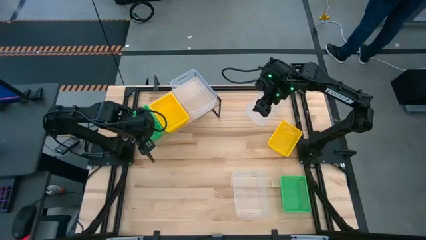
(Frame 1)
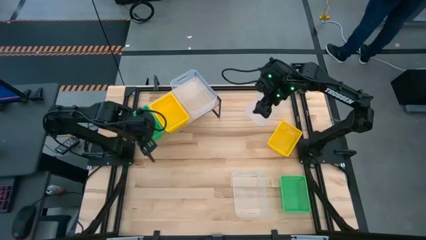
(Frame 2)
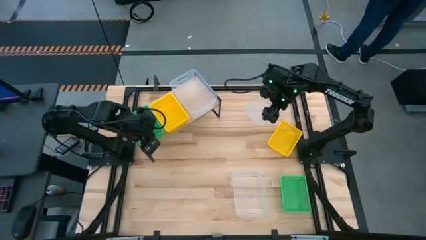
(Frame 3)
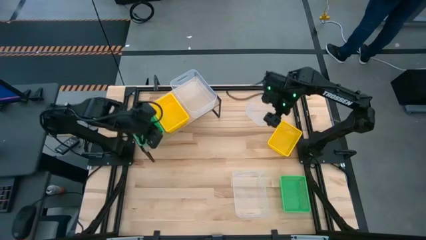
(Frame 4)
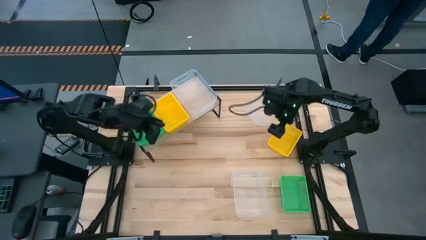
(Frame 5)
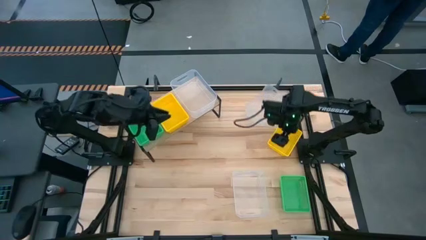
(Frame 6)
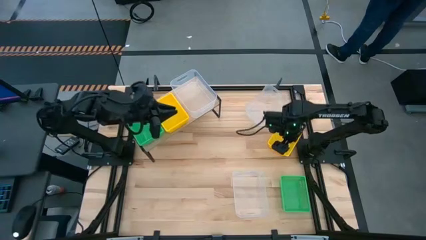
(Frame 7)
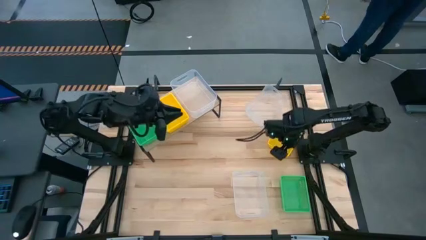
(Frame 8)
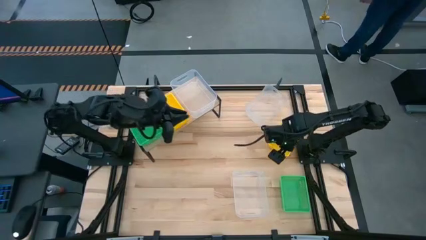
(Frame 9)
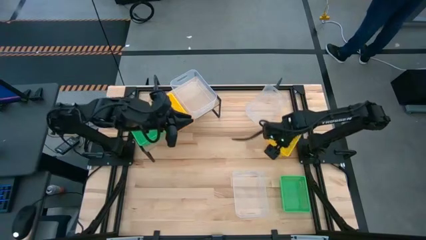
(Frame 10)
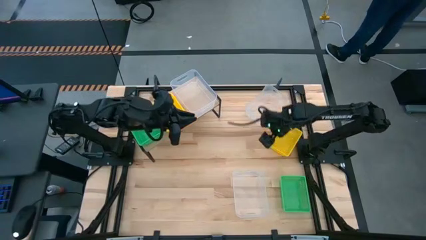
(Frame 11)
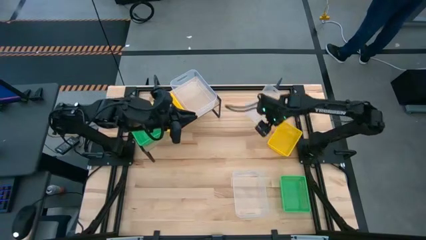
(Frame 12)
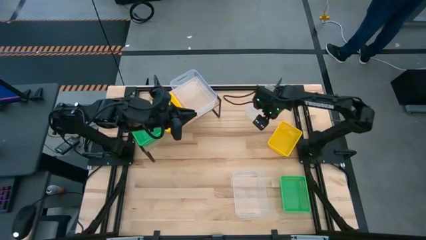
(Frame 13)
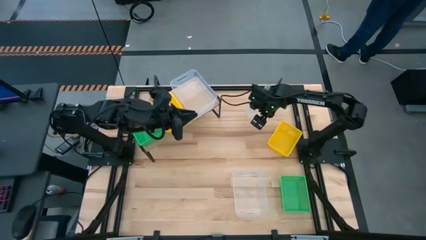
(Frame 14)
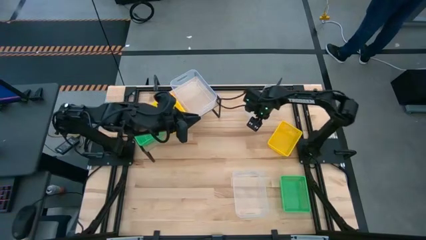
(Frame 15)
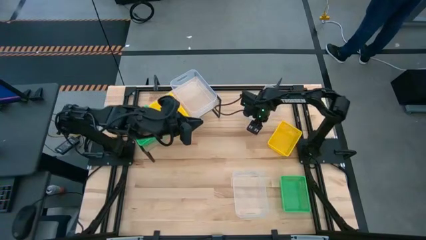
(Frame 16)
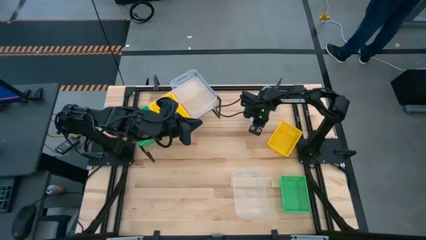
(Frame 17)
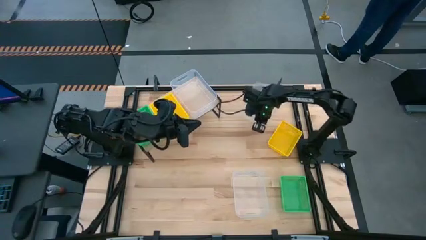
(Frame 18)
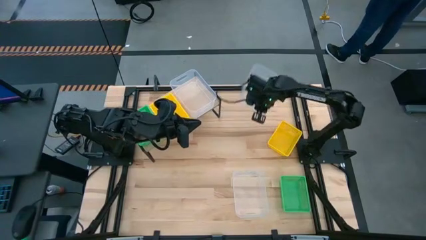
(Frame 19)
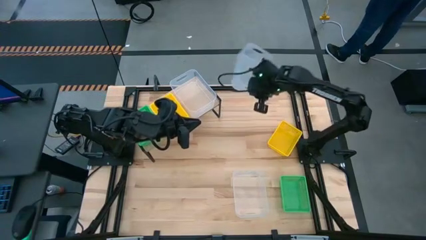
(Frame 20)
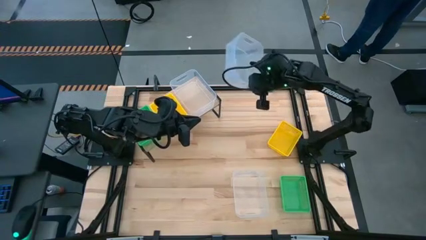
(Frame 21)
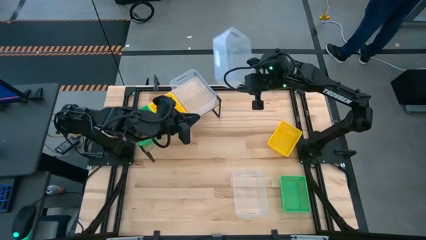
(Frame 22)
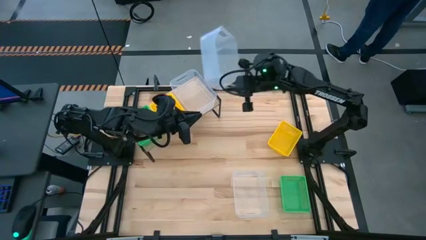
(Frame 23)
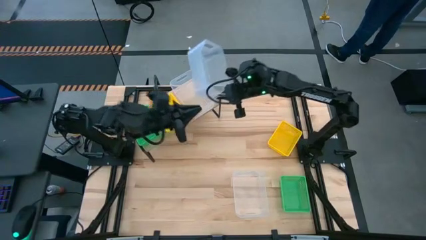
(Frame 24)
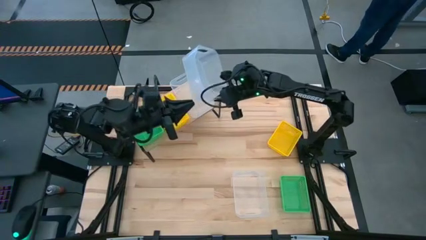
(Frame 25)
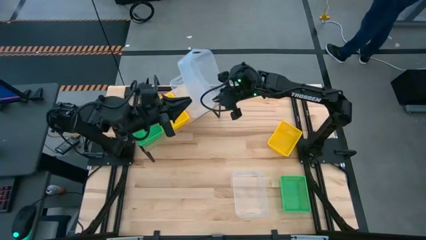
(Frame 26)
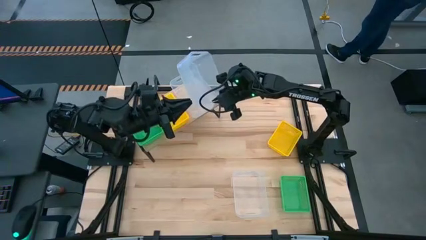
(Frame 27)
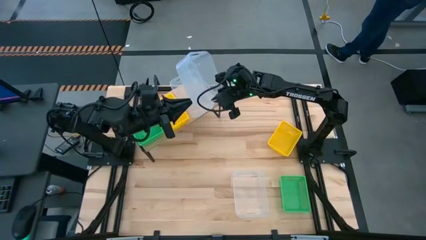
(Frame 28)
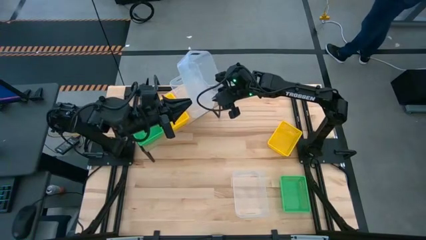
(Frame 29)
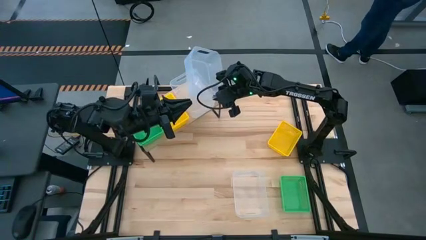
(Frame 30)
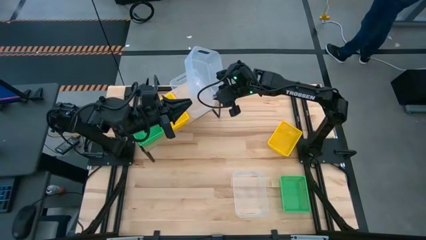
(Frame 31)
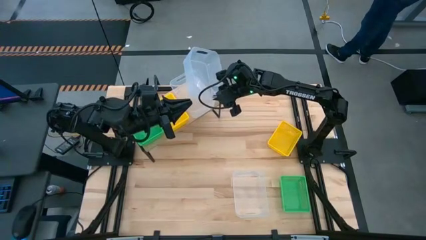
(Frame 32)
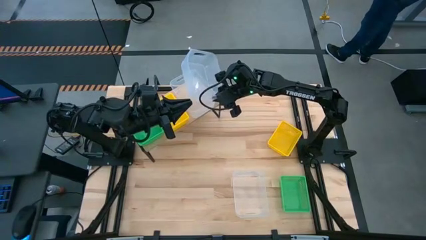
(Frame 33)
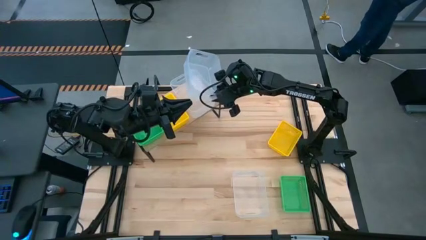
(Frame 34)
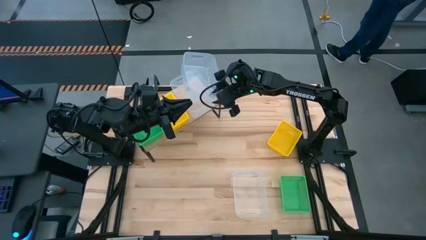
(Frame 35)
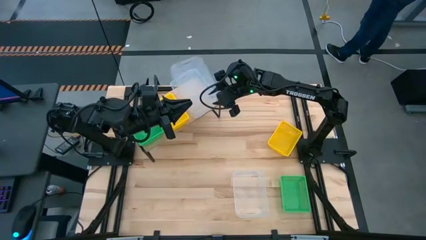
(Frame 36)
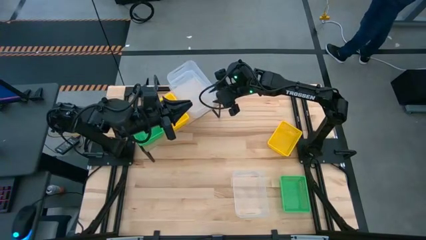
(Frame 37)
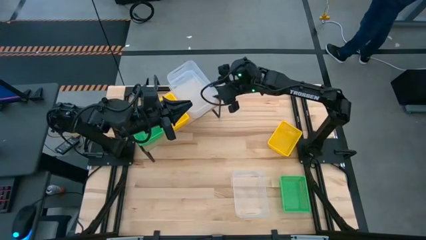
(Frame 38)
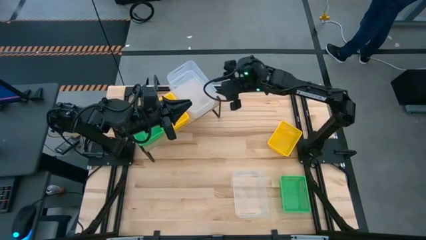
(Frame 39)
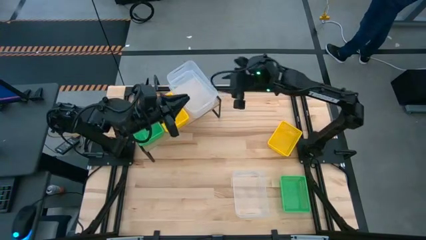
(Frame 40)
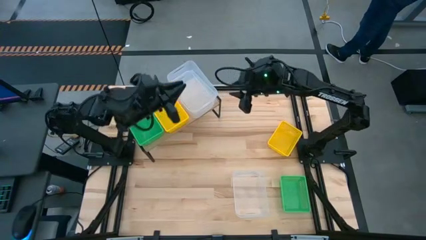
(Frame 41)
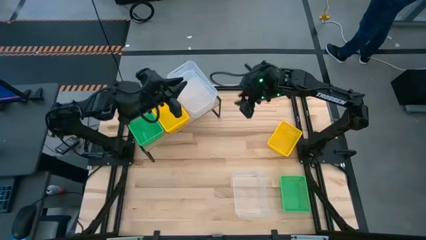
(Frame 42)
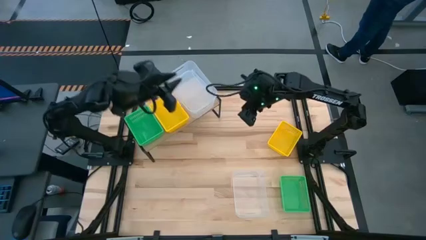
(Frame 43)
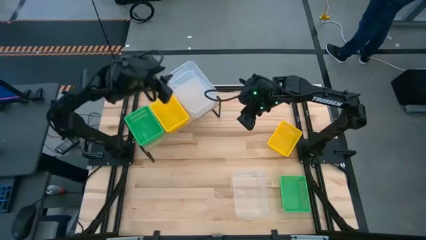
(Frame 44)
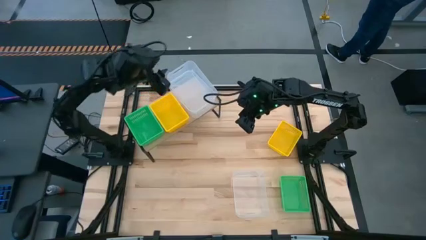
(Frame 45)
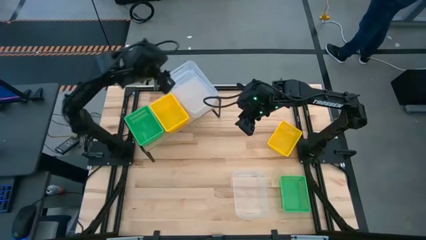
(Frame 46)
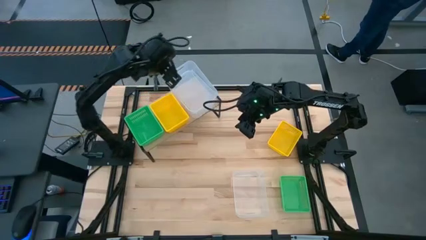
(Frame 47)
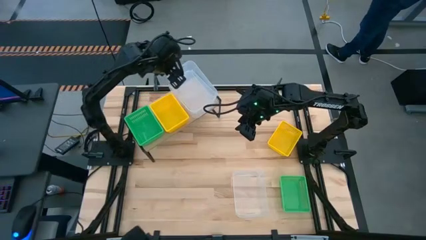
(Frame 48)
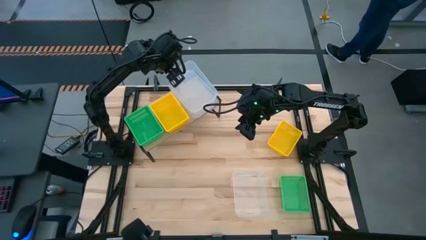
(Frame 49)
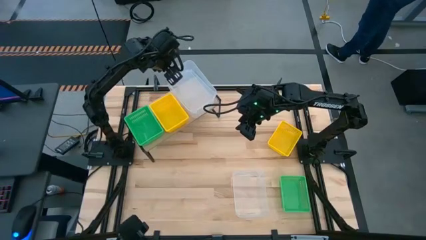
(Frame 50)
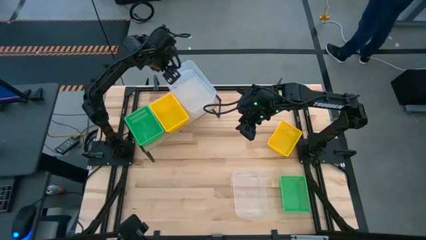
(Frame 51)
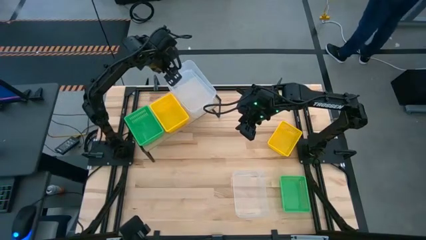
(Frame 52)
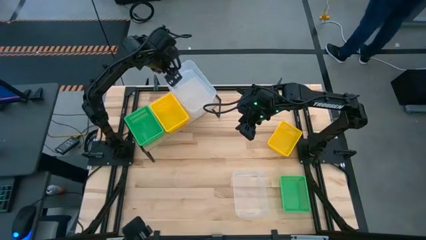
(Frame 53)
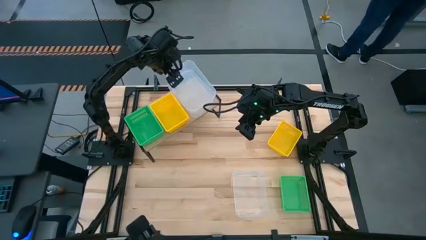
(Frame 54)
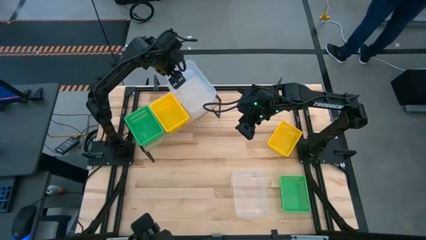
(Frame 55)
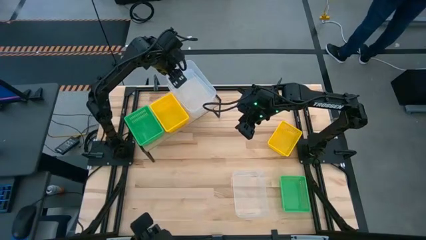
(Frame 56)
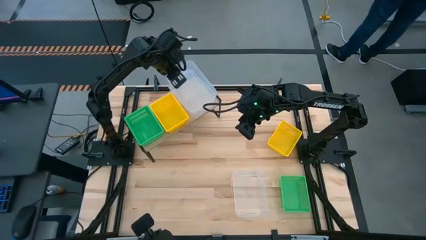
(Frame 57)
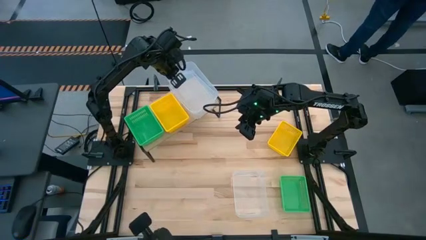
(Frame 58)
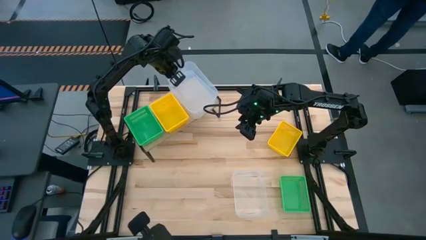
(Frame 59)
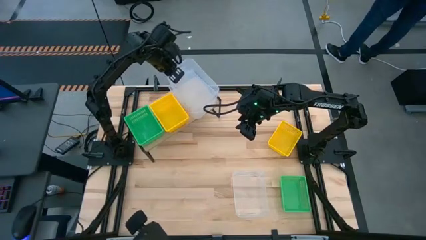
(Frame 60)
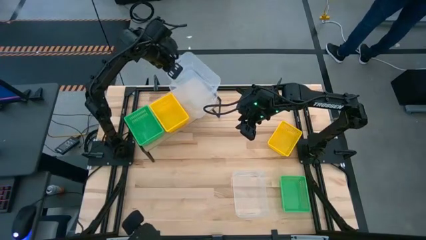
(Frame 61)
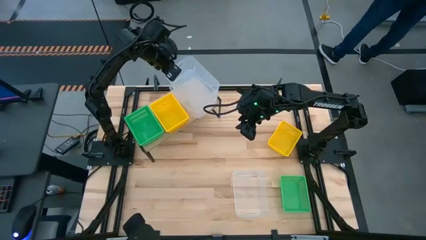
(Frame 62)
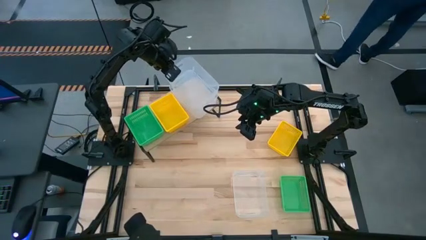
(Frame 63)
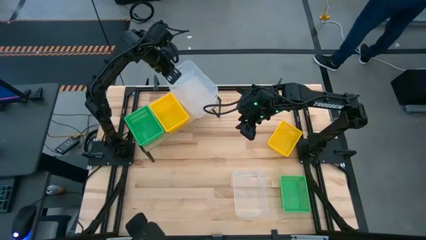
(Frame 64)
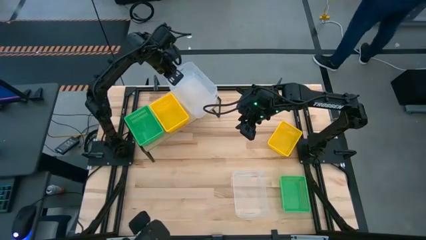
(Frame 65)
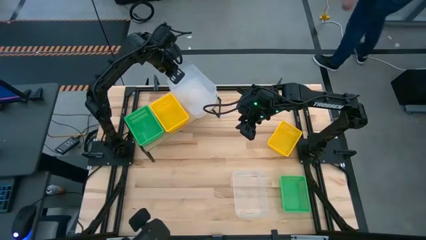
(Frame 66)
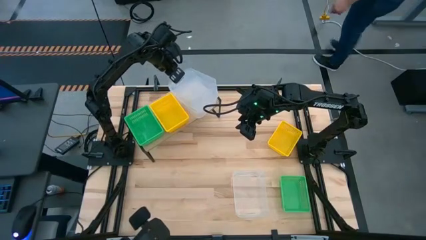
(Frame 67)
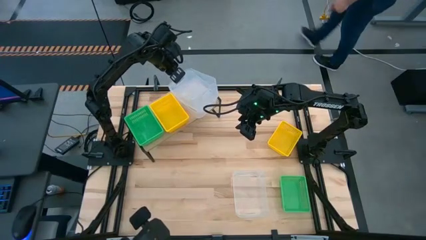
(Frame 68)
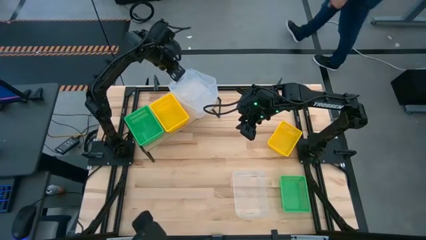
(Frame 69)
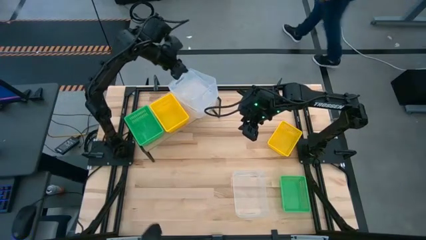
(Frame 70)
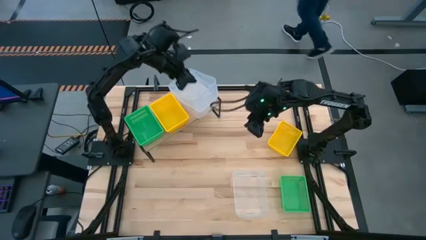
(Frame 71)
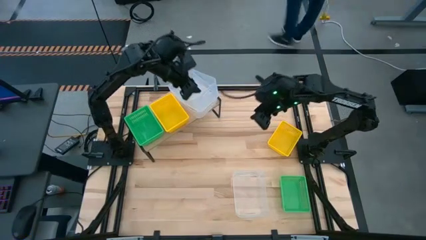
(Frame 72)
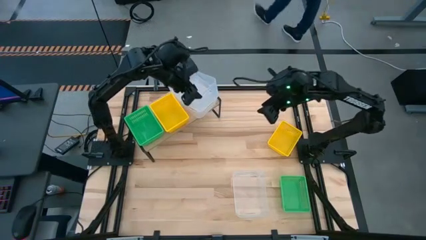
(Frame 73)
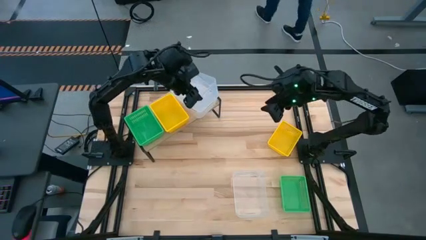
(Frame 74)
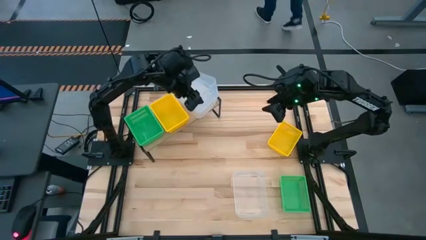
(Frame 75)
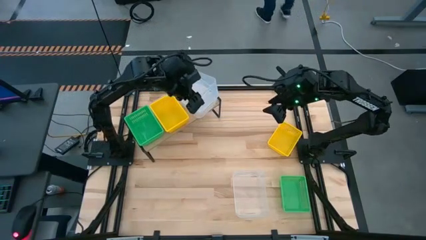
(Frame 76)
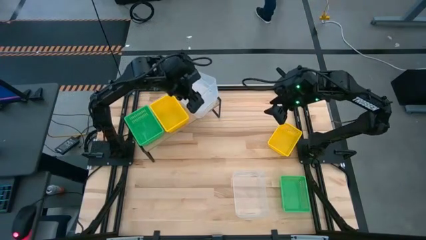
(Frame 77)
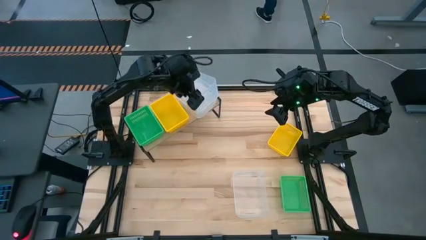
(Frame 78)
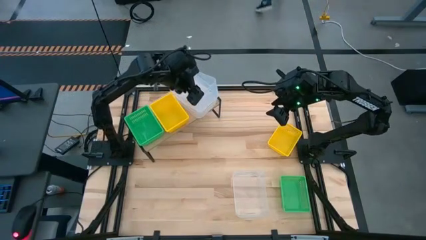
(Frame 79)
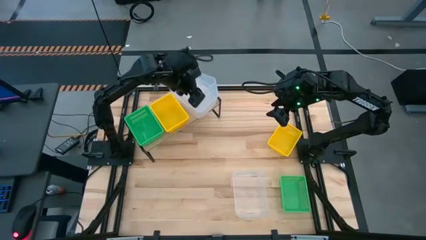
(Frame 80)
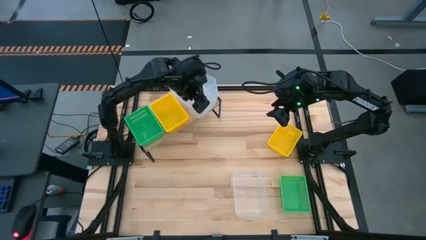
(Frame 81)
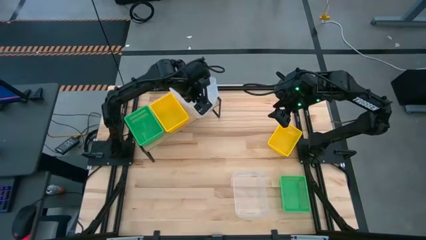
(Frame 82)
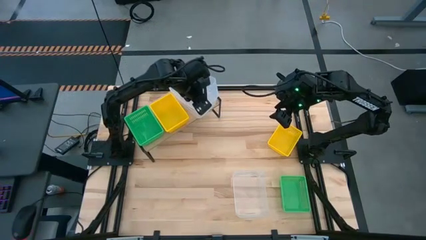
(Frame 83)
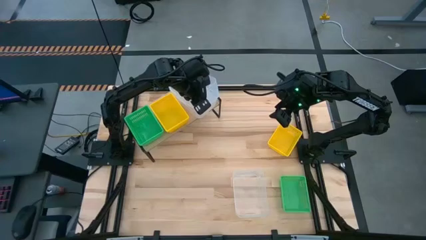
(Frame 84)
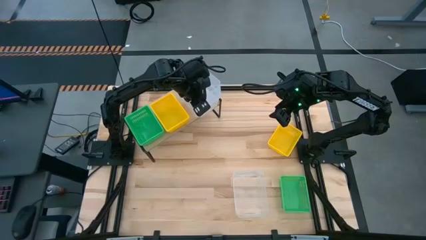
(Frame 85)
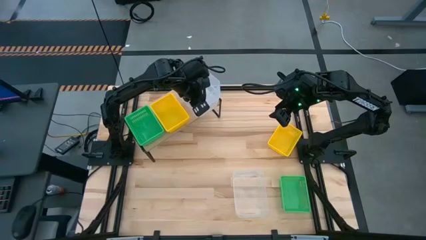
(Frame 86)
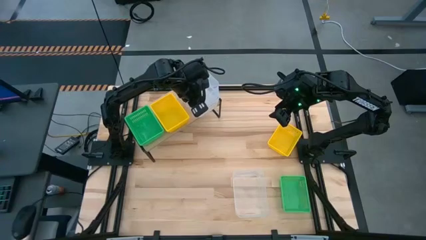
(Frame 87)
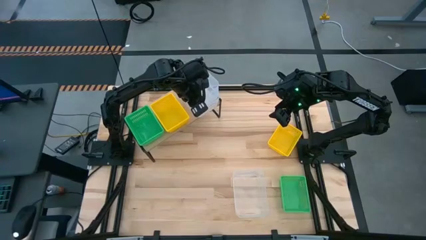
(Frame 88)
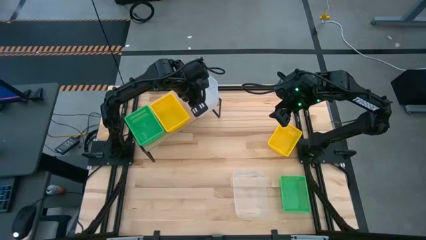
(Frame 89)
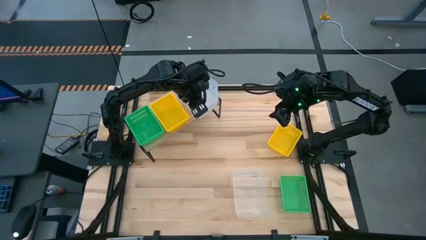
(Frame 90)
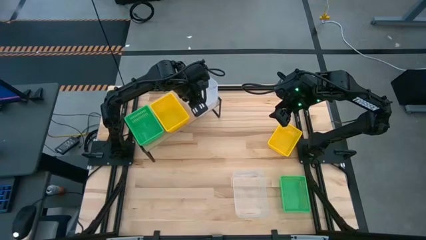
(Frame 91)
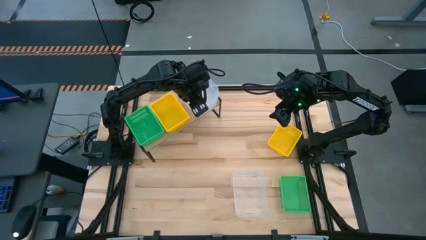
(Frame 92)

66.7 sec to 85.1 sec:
Task: Stack baskets on shelf by color
Stack the top transparent bin on top of the other transparent bin on the shelf
